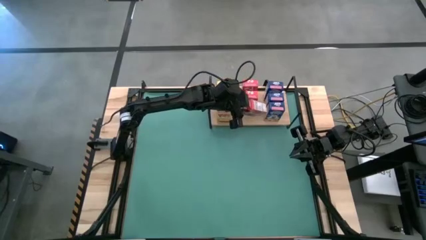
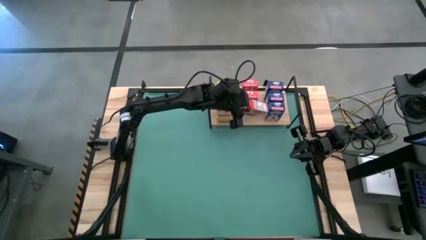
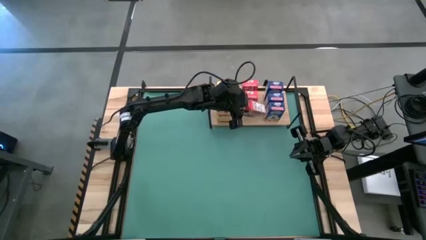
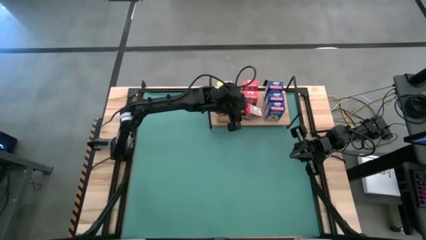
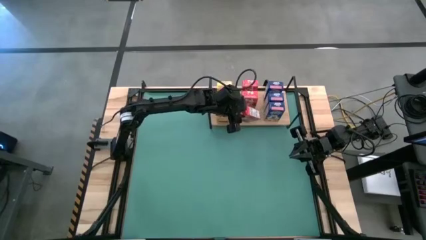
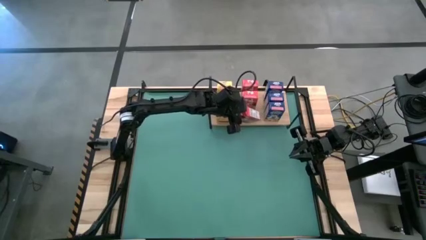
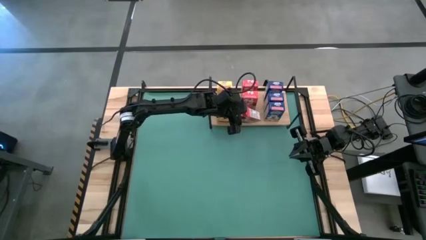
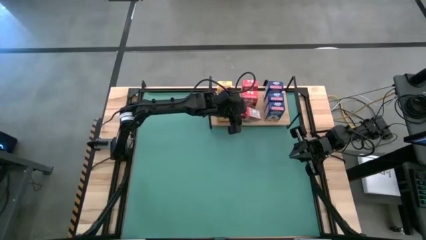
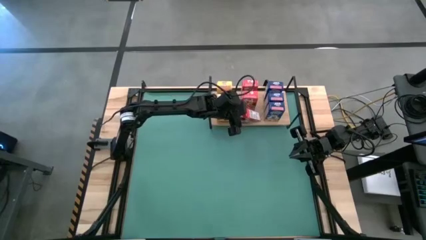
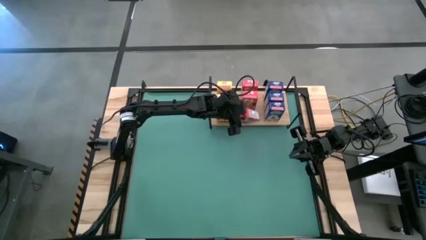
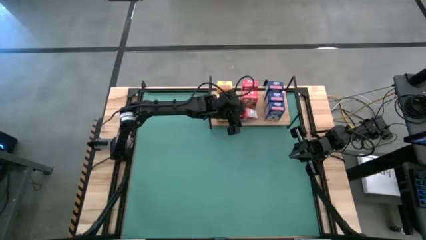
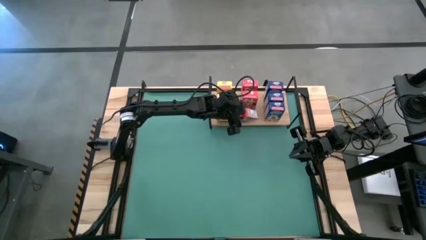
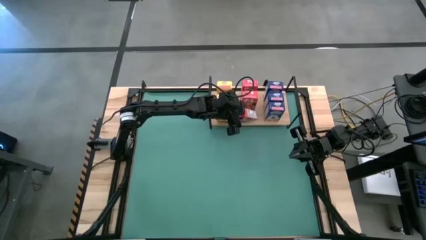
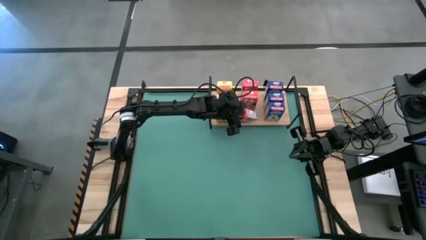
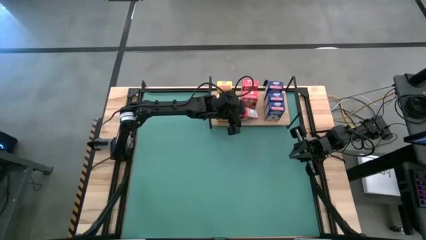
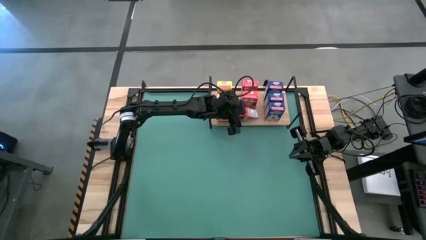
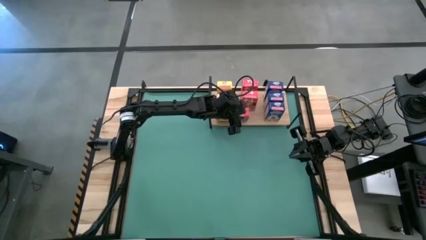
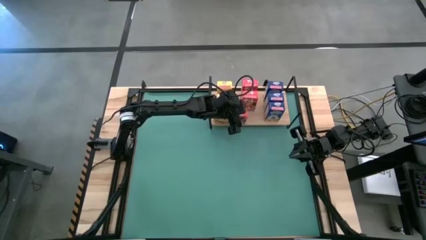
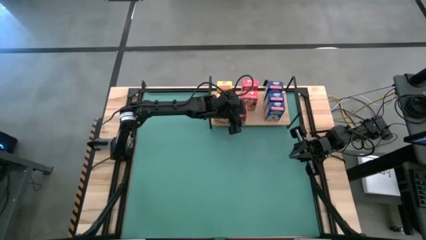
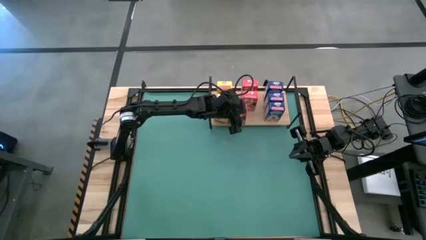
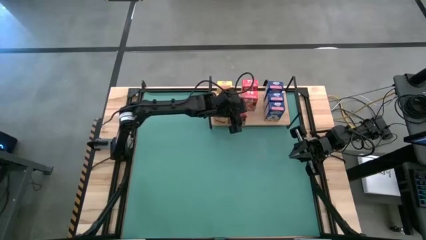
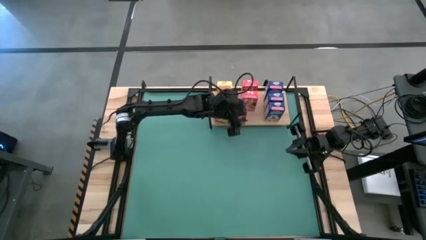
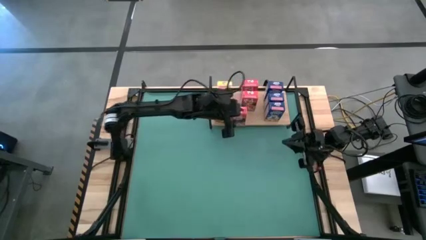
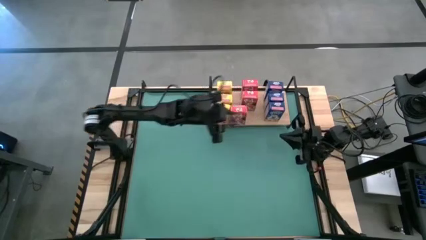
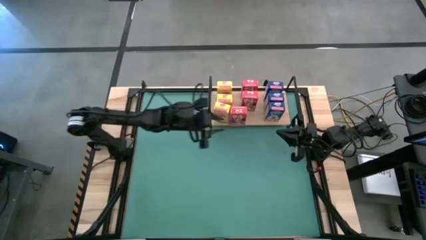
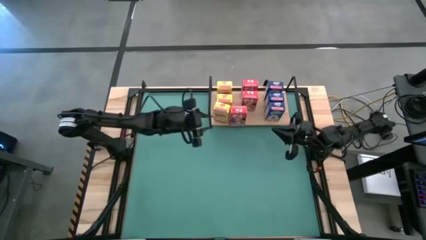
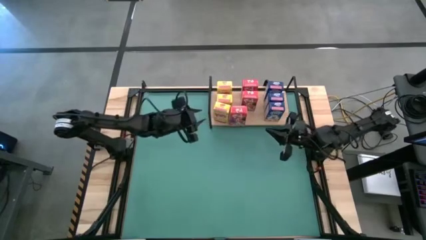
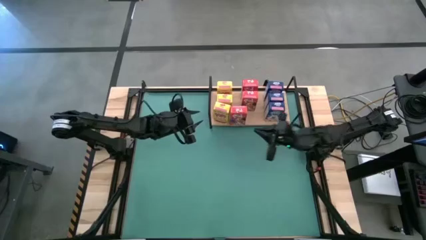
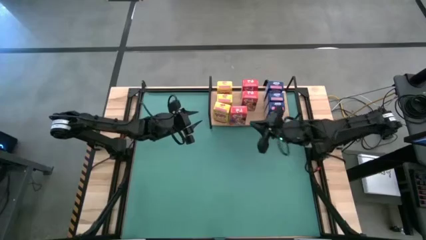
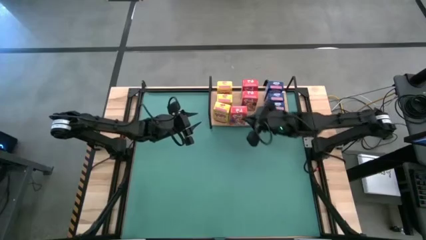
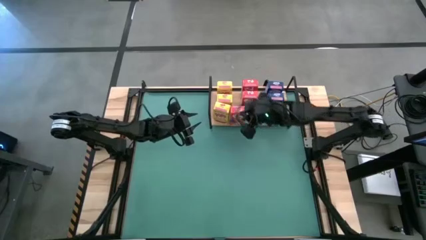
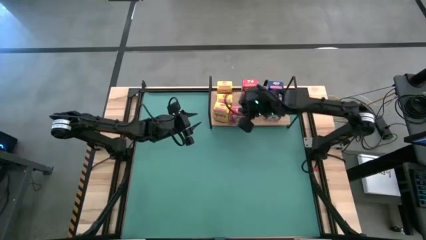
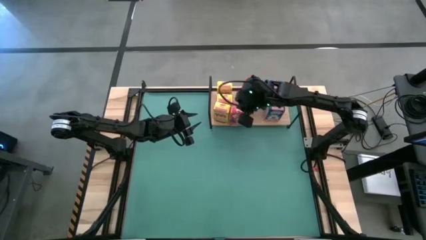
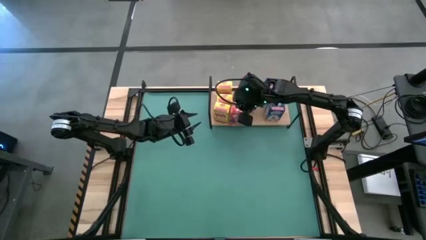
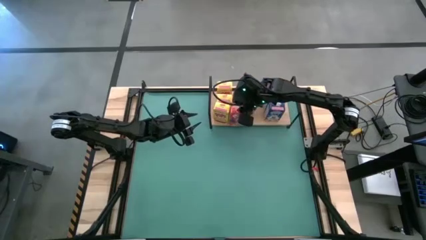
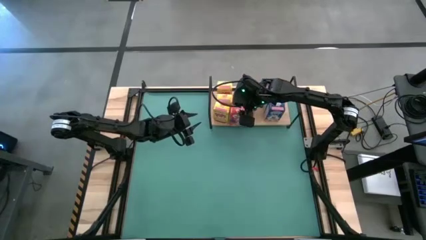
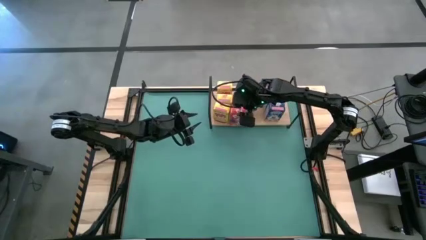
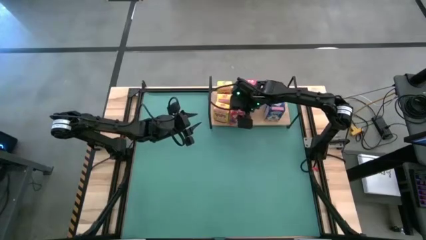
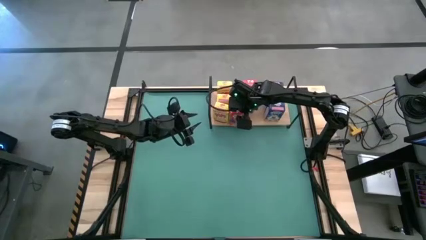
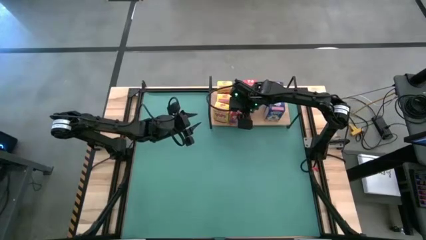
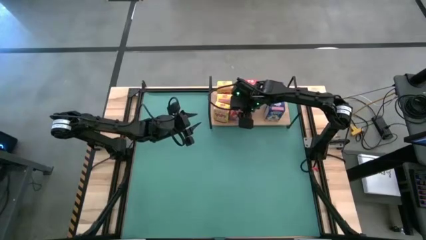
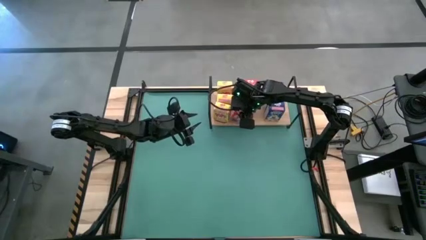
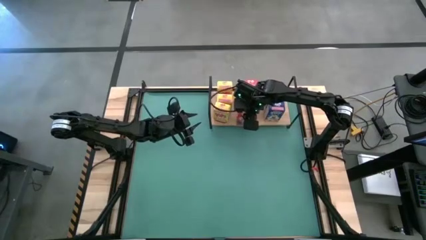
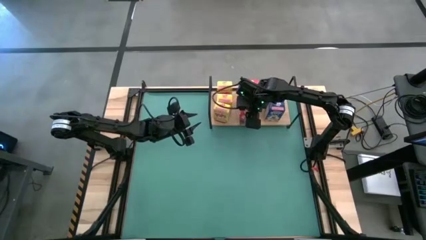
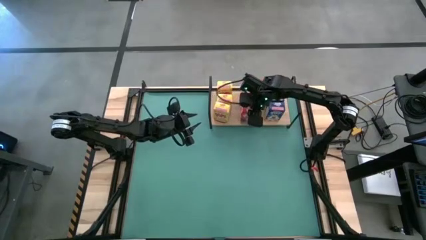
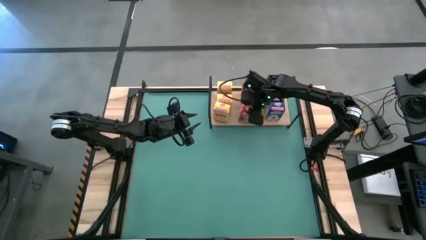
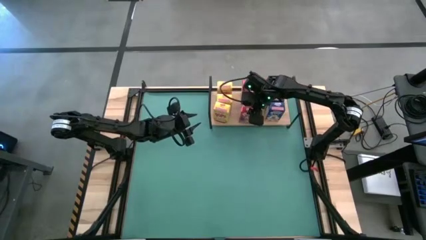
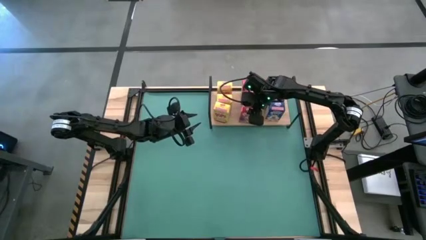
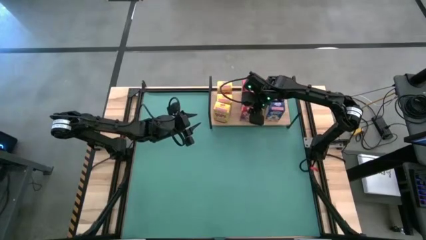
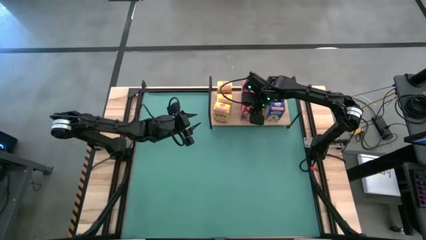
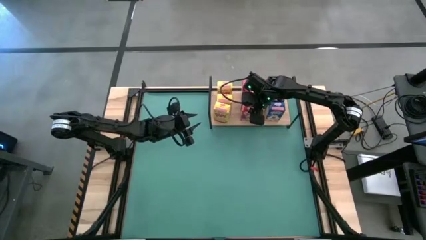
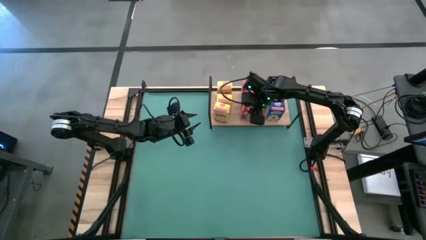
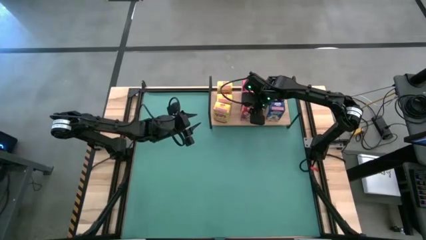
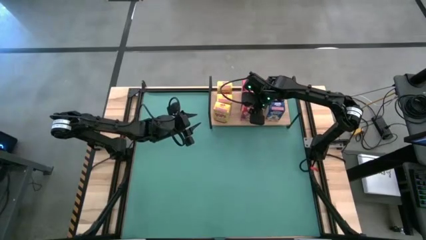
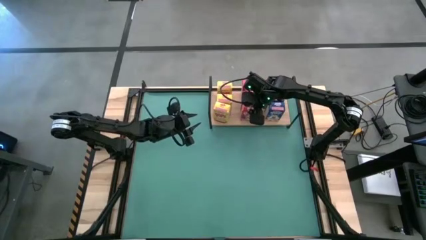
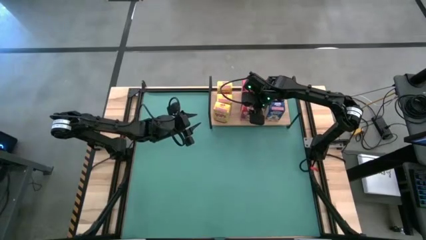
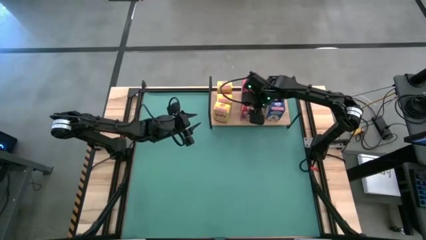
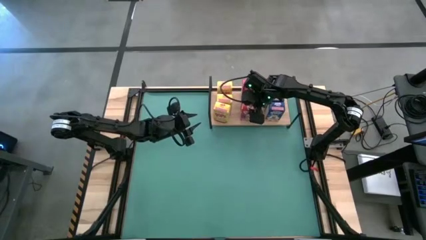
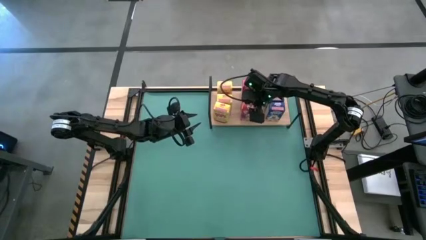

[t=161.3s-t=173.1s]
Task: Stack cereal on shelf
Put the red cereal box on the shelf aligned with the other red cereal boxes

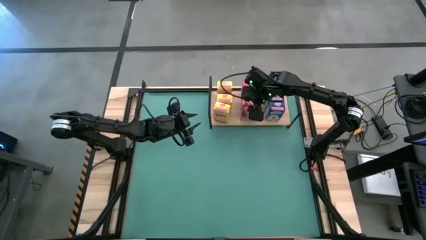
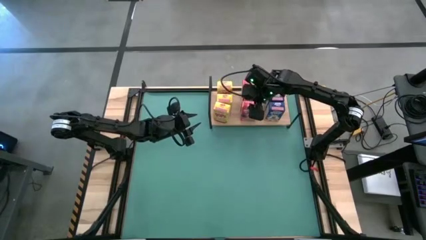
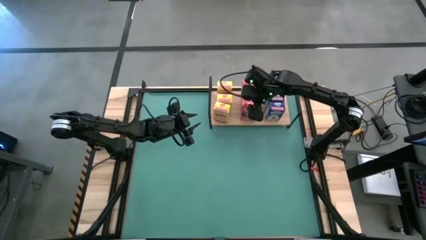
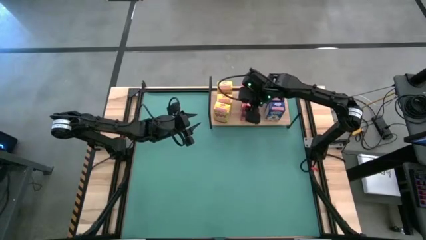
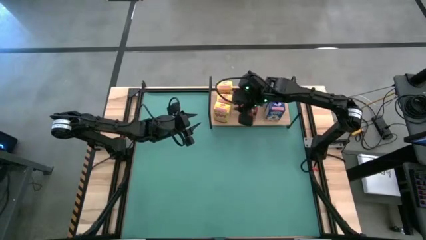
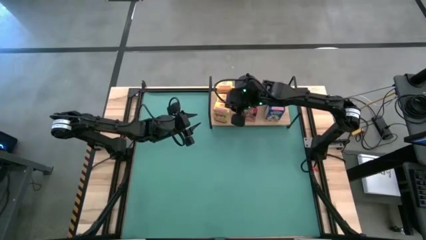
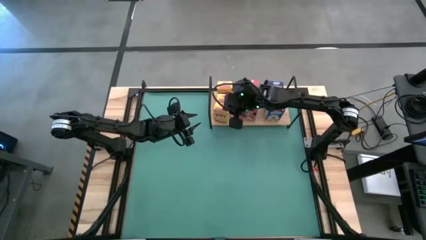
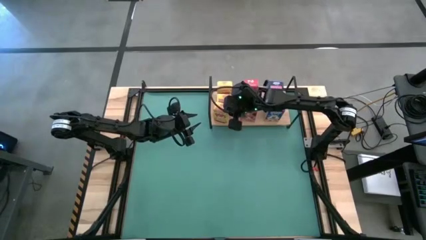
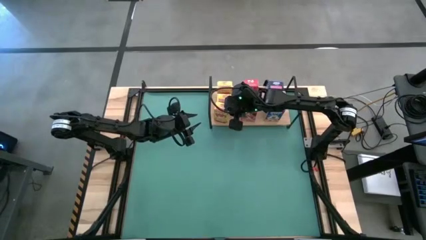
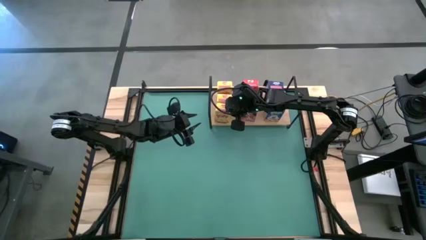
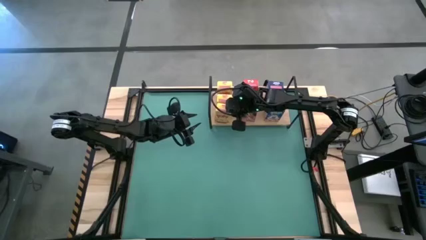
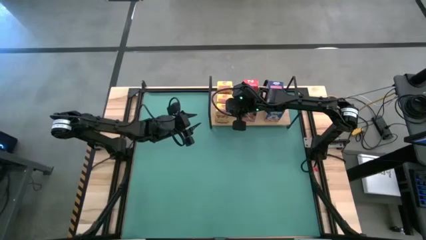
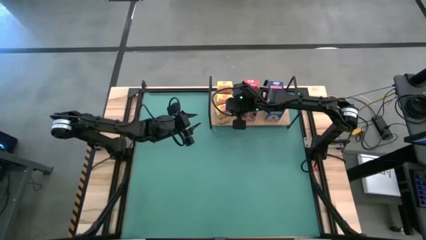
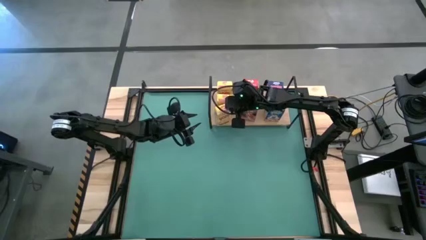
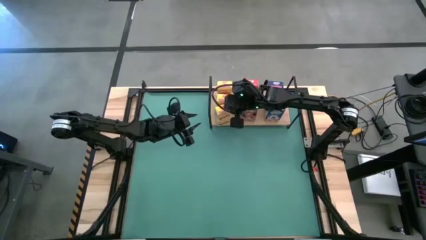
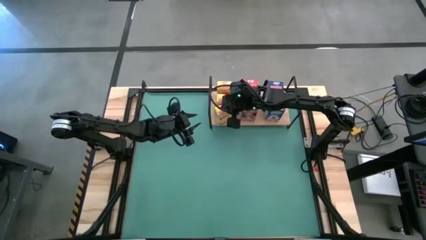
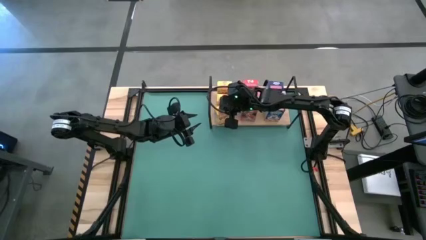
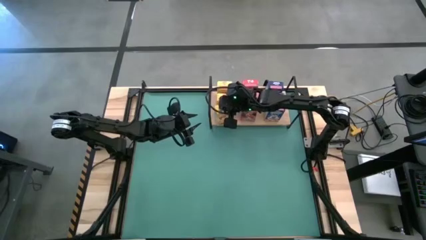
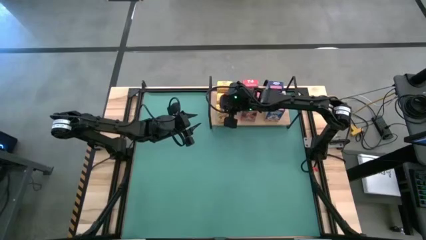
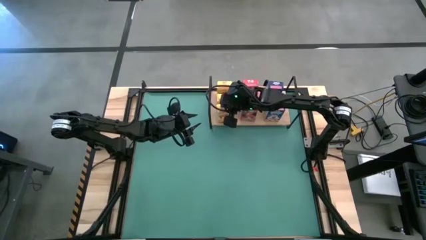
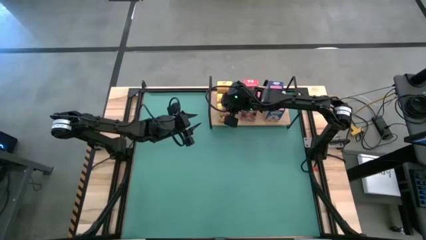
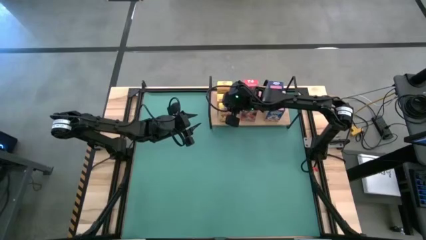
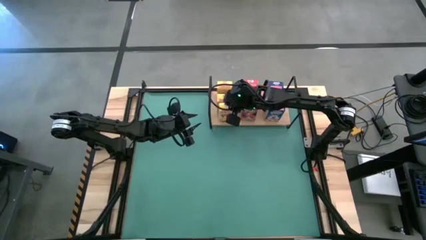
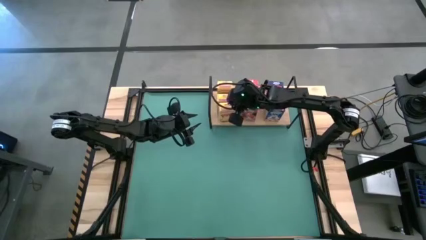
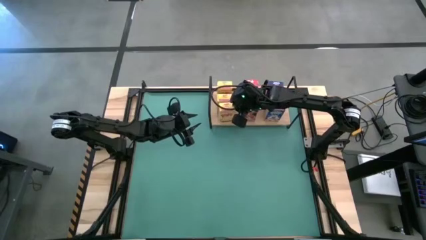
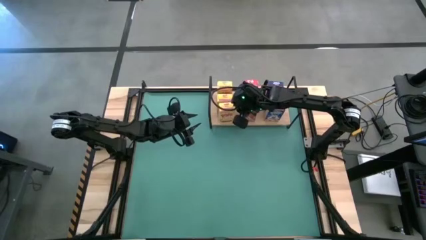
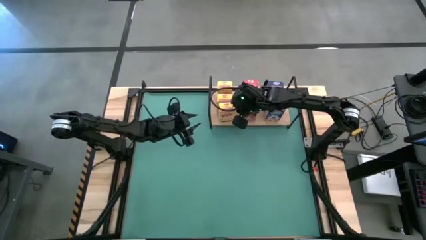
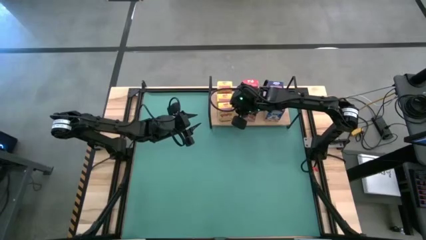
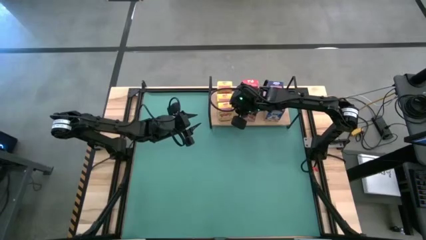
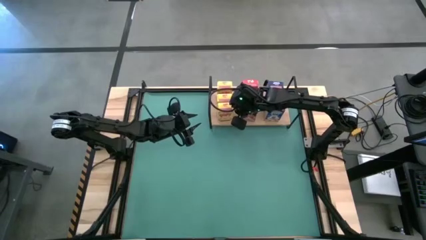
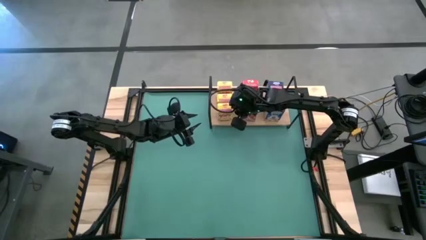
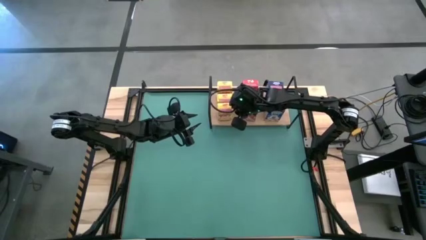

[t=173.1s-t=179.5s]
Adjust the yellow cereal box on the shelf
